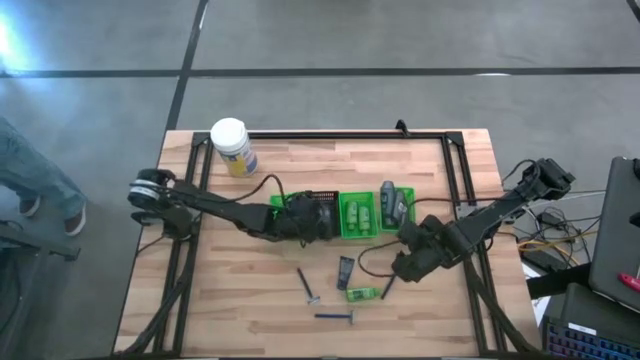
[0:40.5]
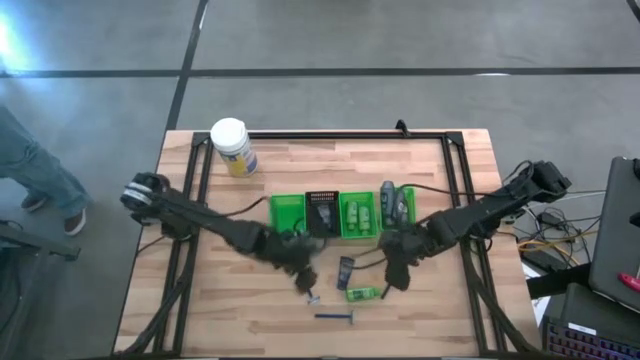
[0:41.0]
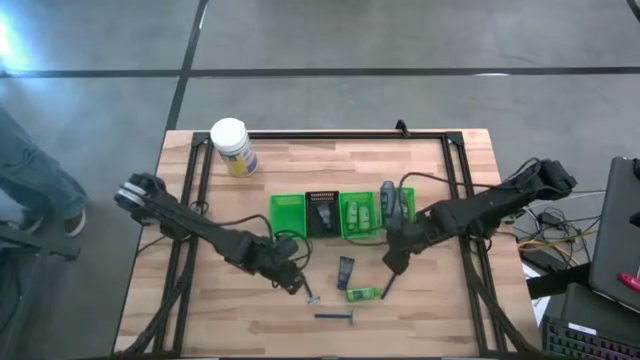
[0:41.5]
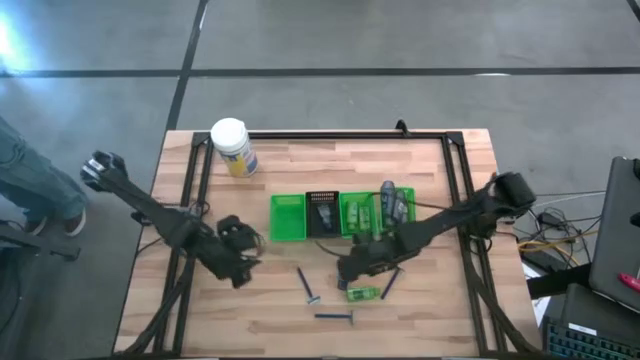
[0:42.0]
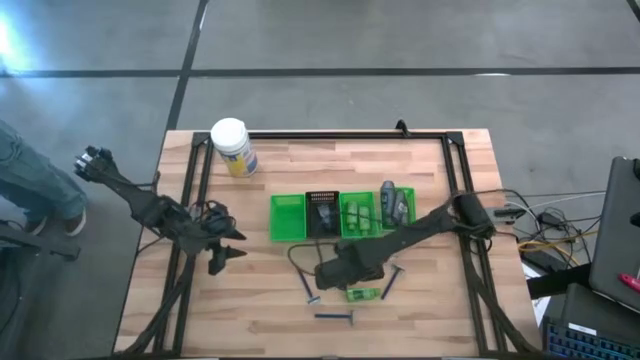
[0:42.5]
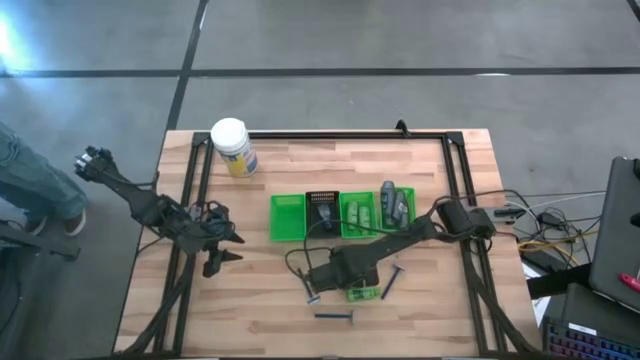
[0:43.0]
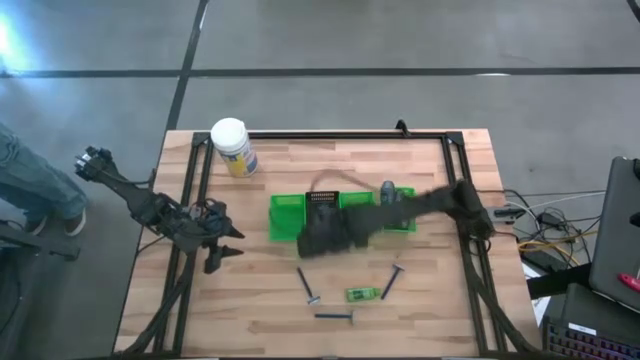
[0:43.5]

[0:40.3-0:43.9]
Task: Pick & Place Travel size toiletries
Put the black shave cream into the black basket

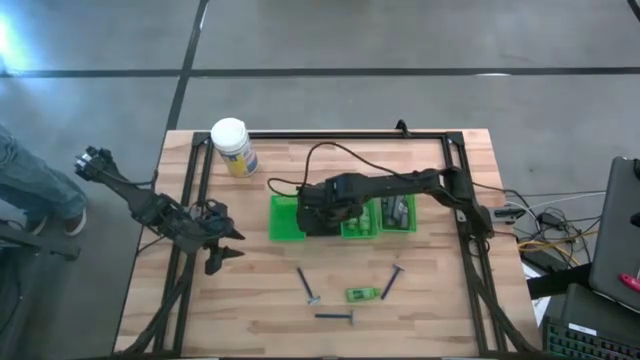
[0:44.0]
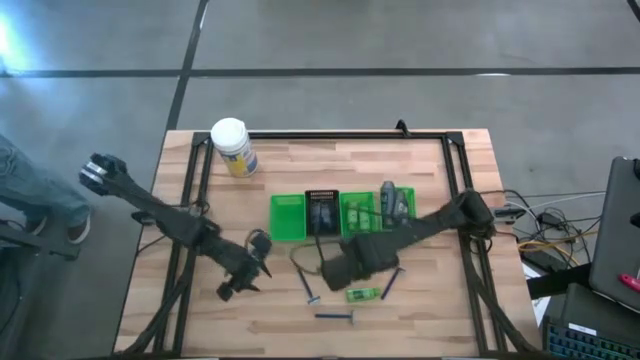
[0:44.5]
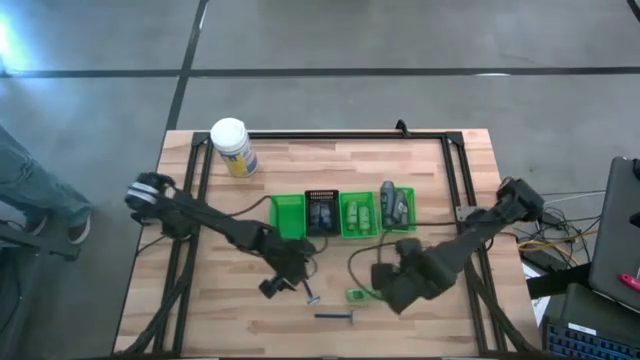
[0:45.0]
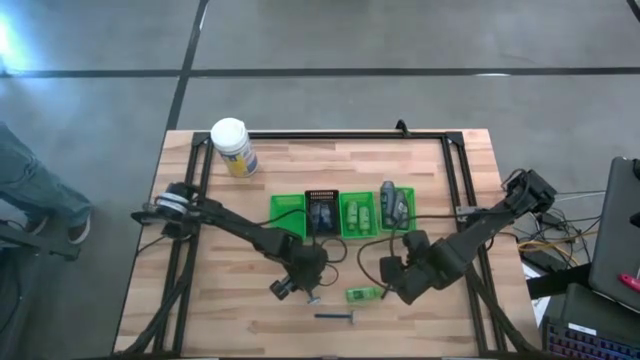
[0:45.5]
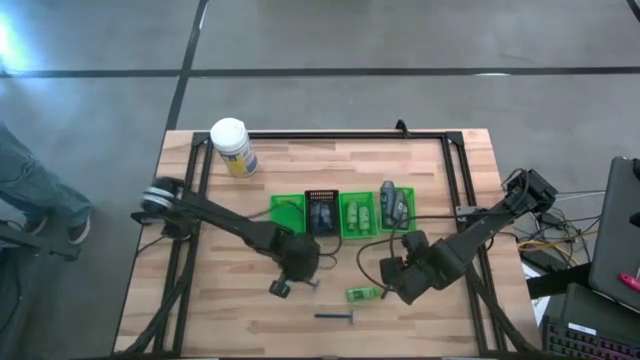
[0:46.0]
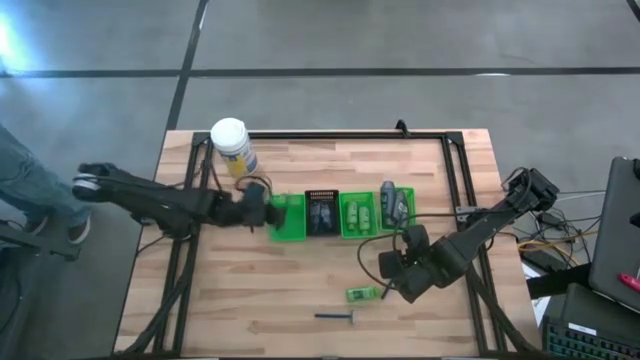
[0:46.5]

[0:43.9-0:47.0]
Put the blue razor into the left green basket

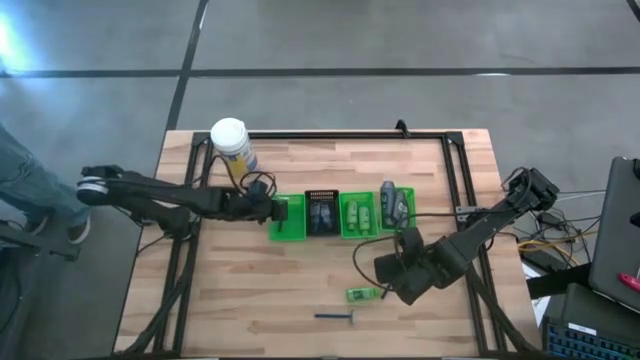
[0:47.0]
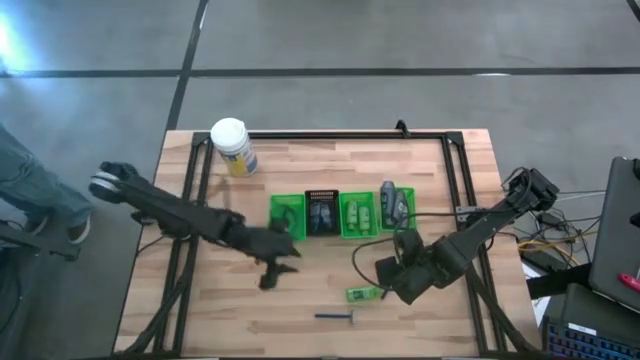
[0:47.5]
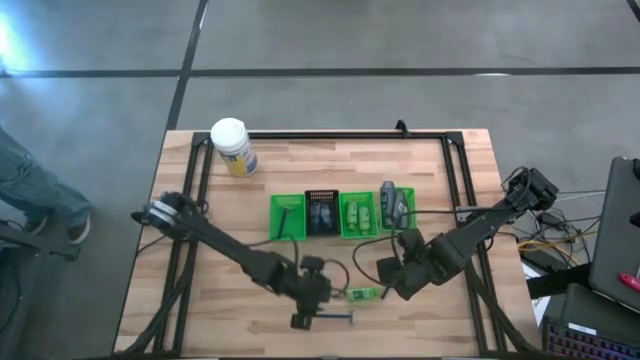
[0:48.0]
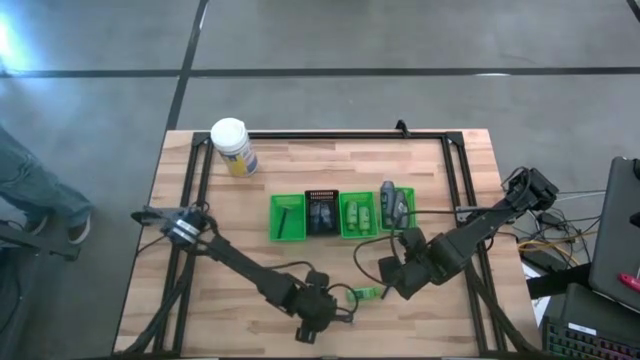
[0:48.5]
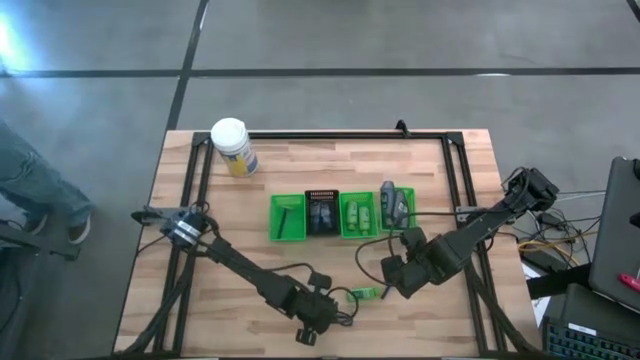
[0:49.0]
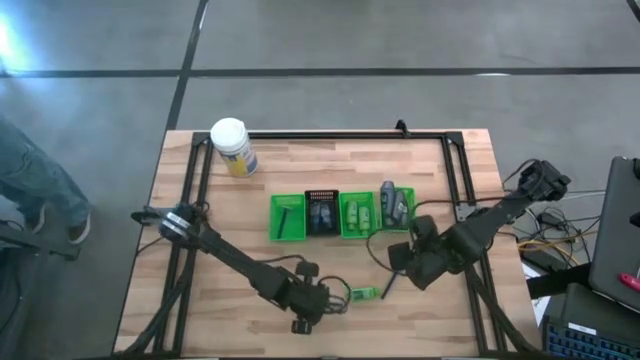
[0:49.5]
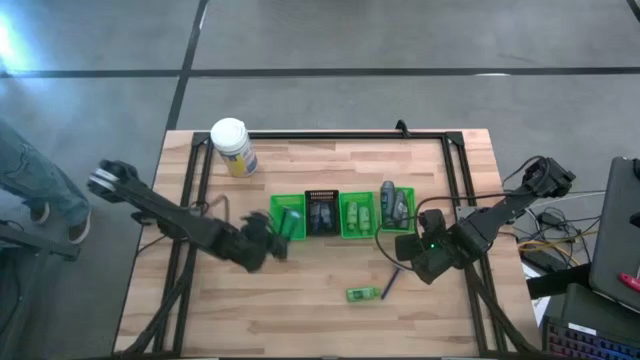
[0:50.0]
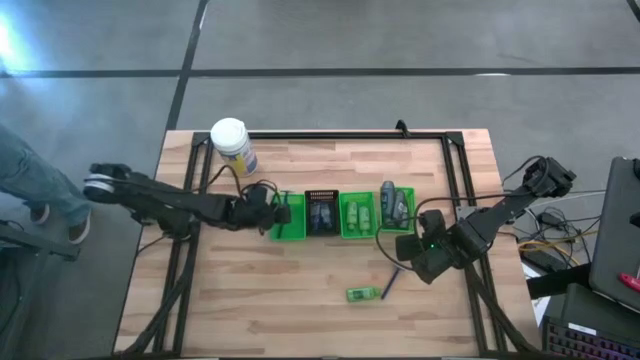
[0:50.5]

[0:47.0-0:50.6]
Put the blue razor into the left green basket

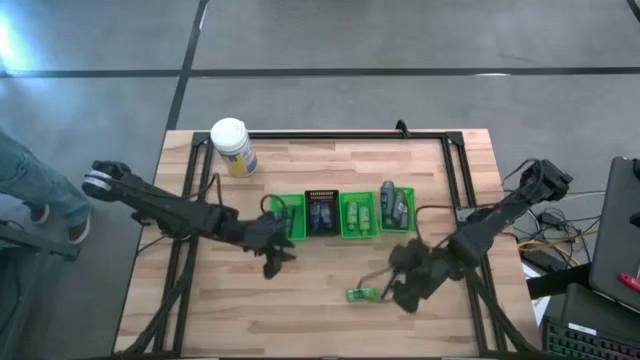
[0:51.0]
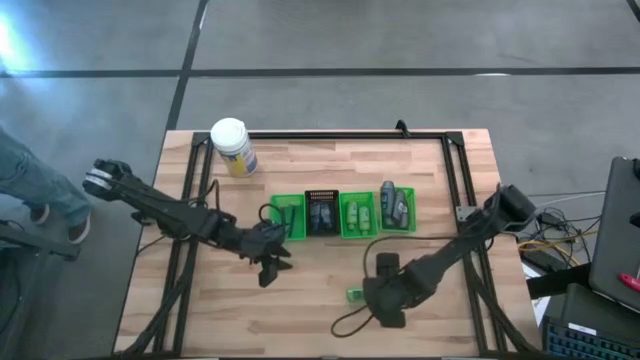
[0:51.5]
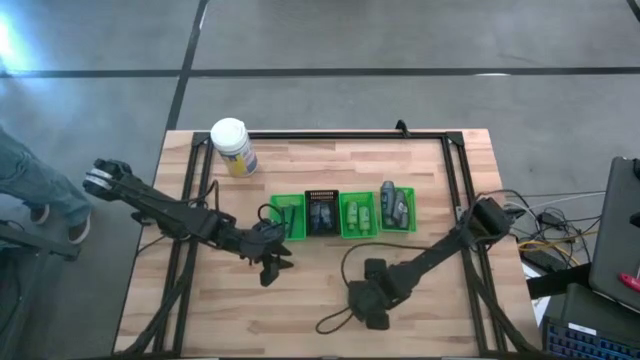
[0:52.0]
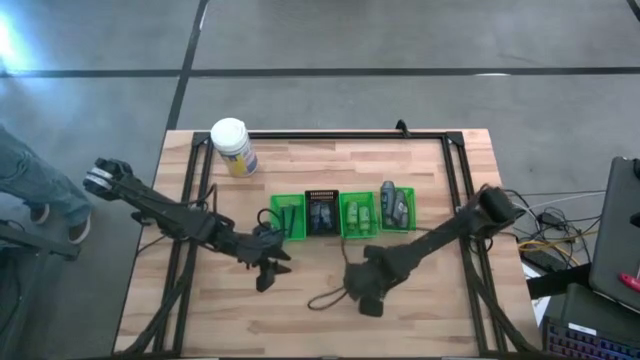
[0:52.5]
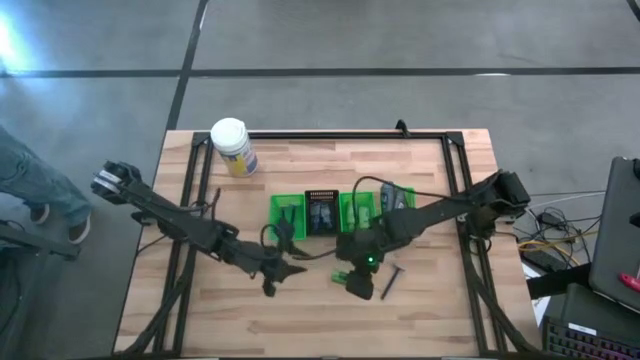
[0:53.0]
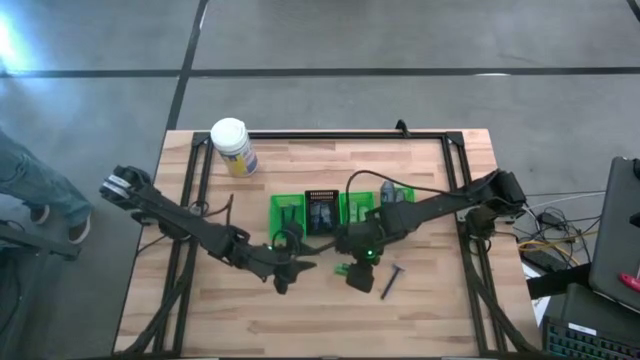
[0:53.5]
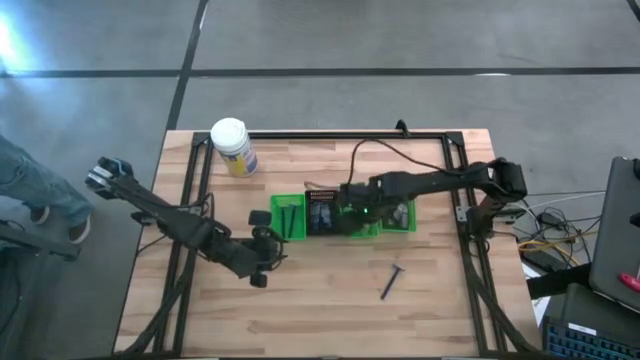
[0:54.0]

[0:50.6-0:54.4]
Put the green shampoo into the middle green basket

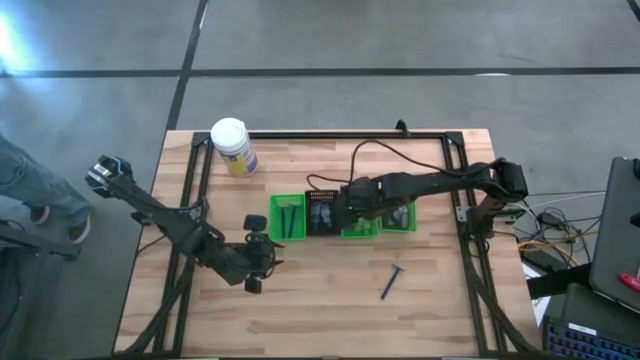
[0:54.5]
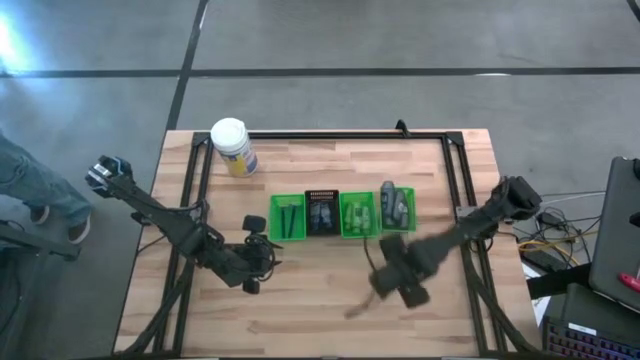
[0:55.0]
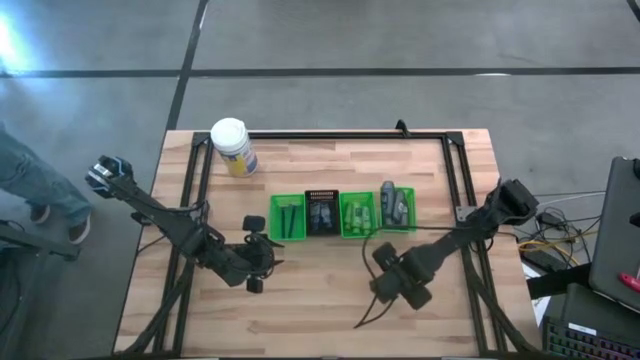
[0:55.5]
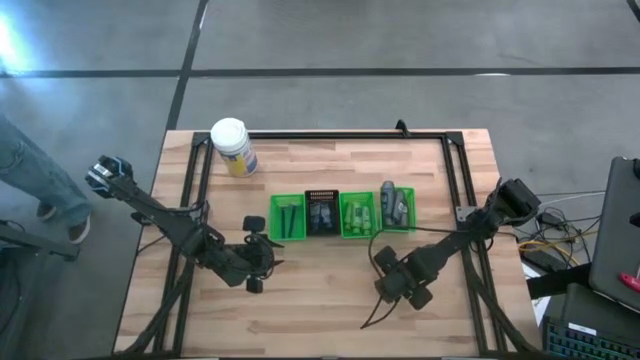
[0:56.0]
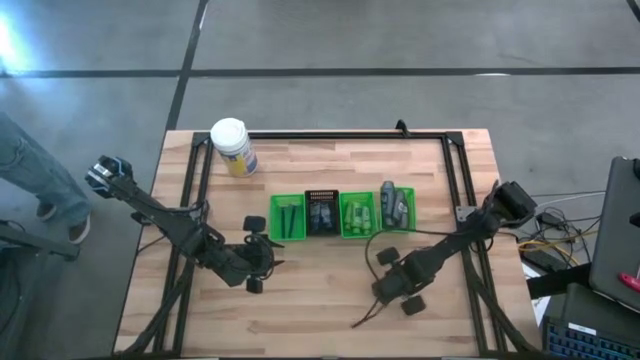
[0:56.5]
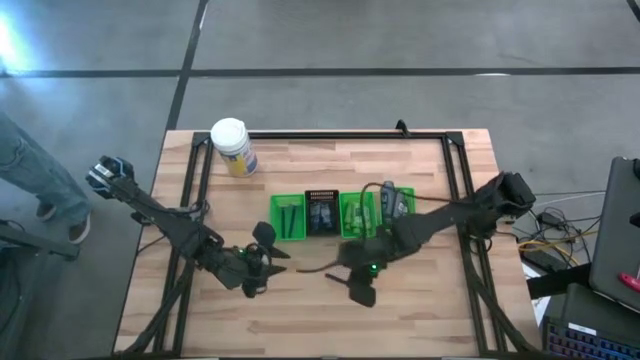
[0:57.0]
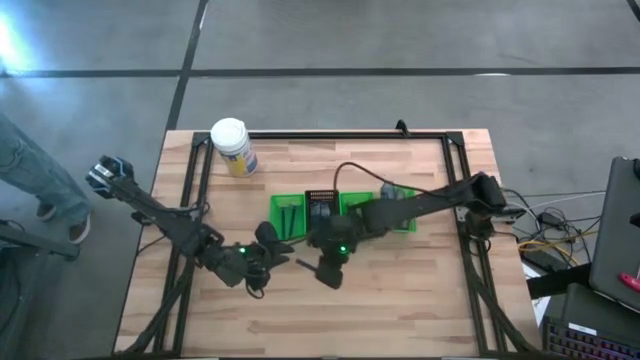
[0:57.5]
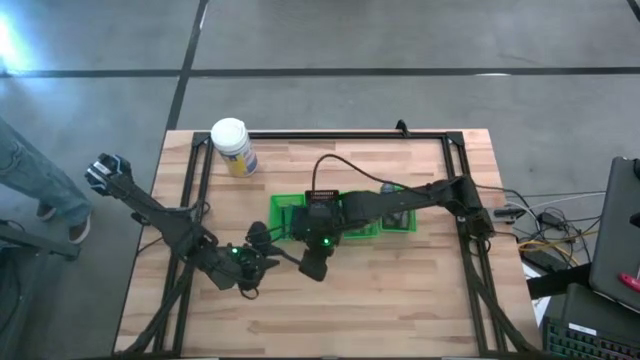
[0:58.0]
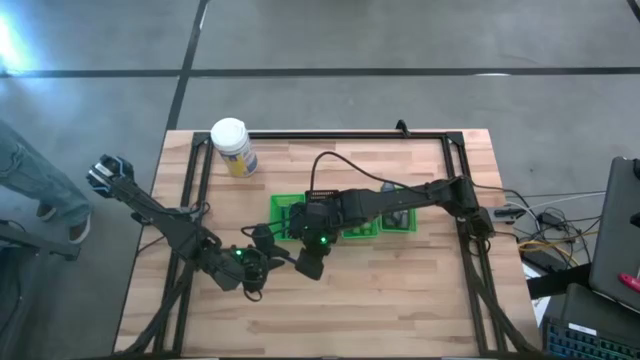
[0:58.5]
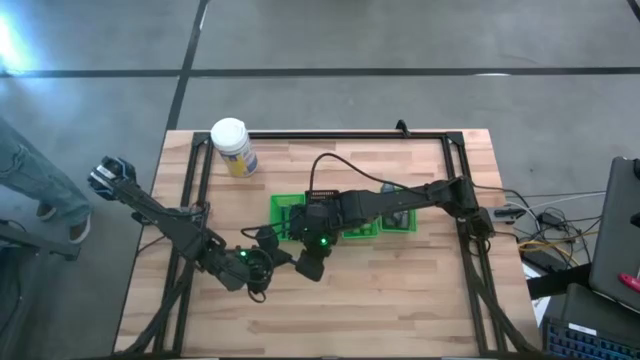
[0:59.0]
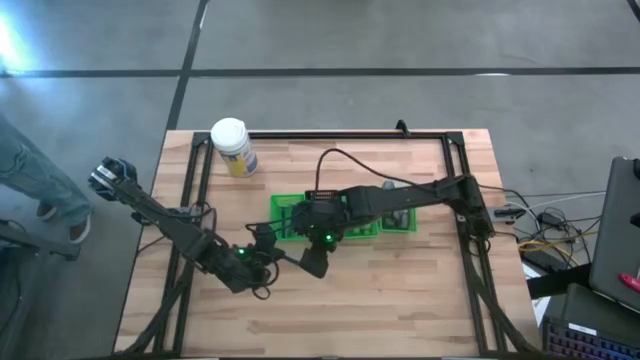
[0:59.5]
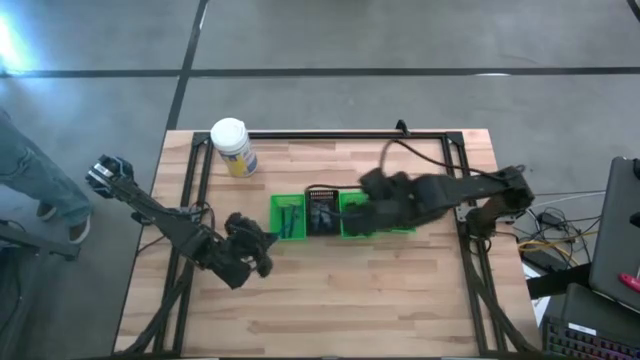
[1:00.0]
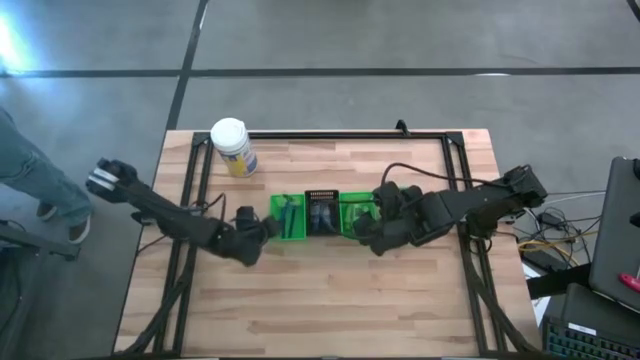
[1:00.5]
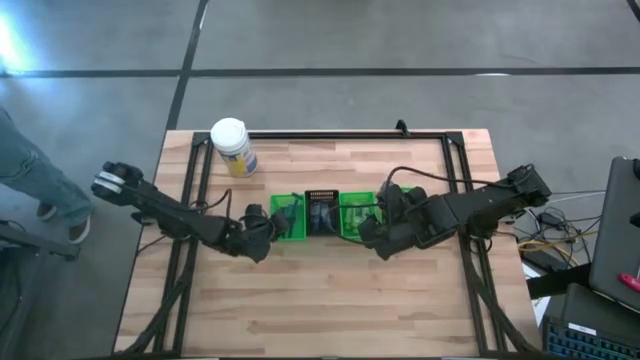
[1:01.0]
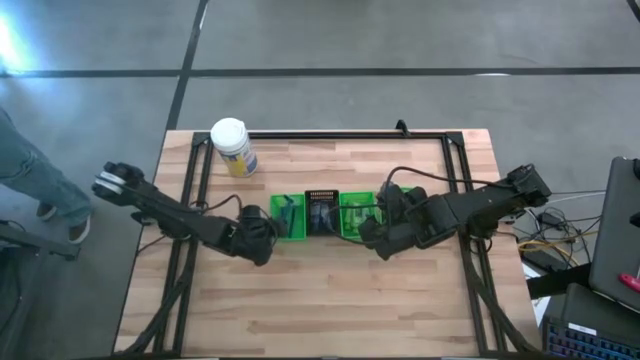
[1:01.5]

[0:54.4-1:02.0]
Put the blue razor into the left green basket
